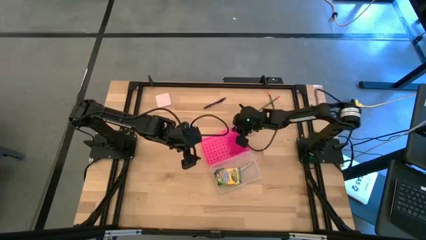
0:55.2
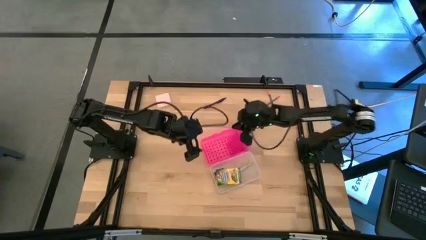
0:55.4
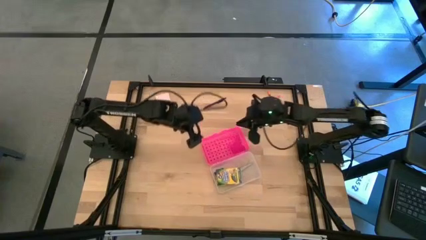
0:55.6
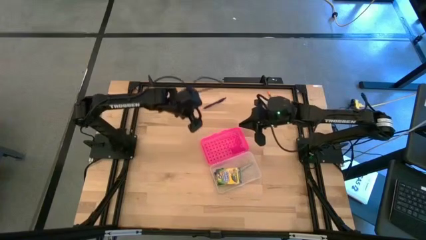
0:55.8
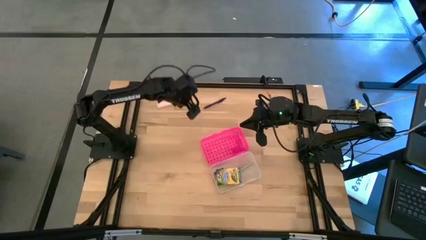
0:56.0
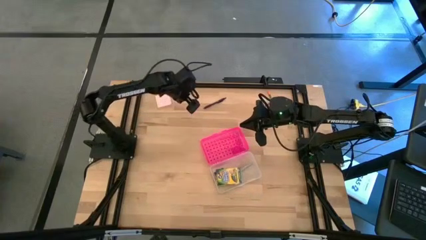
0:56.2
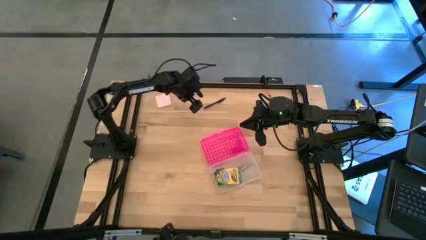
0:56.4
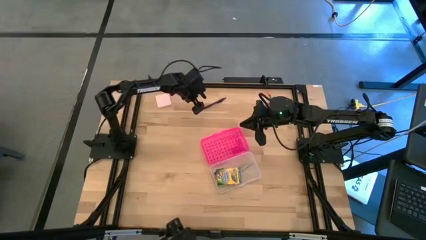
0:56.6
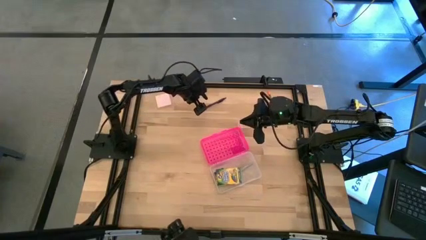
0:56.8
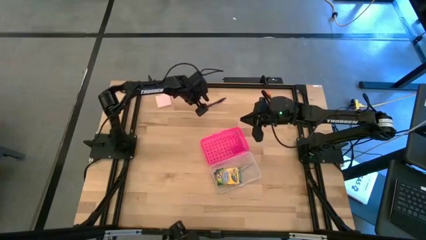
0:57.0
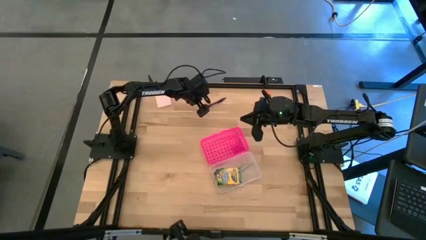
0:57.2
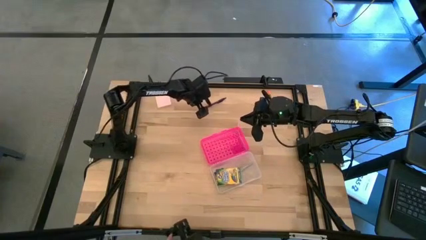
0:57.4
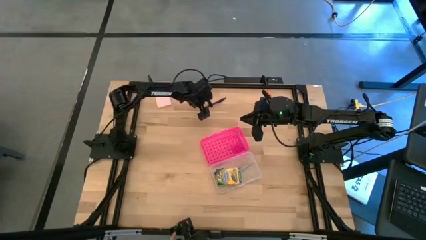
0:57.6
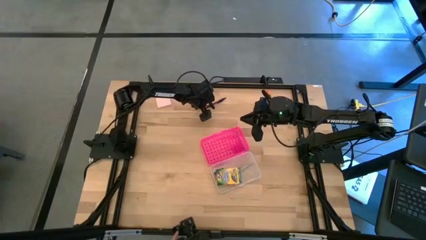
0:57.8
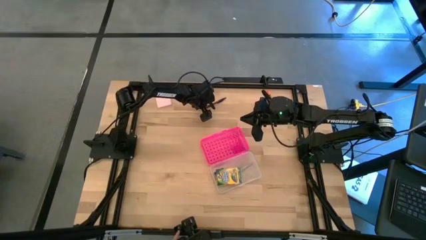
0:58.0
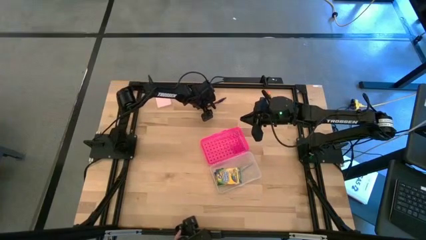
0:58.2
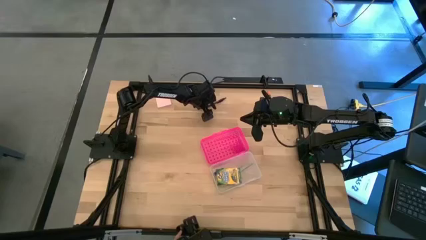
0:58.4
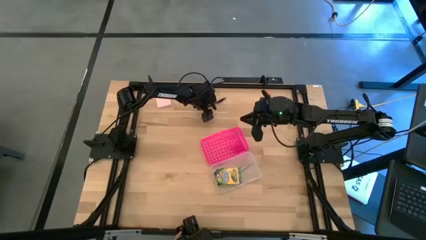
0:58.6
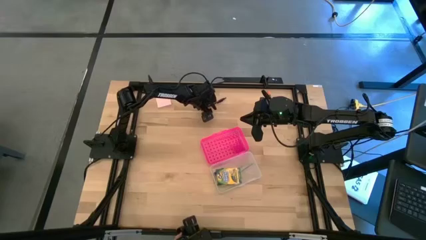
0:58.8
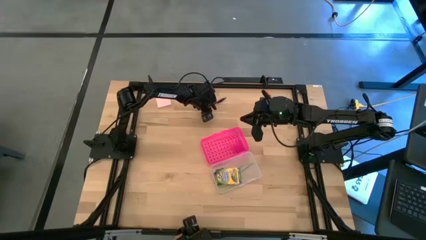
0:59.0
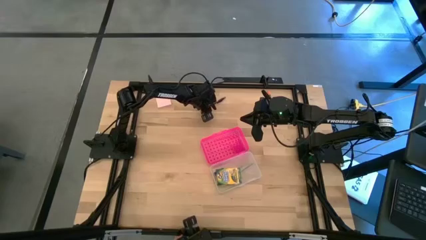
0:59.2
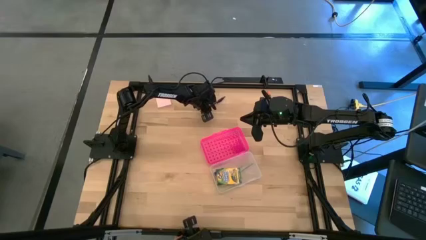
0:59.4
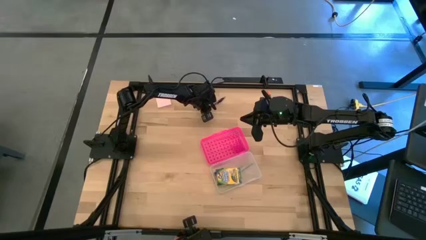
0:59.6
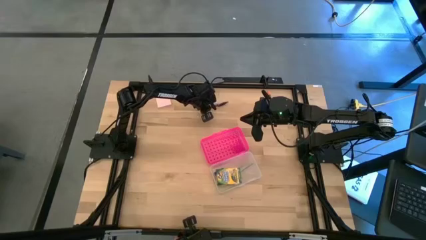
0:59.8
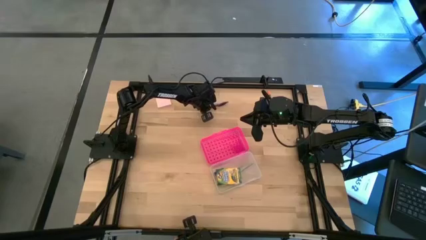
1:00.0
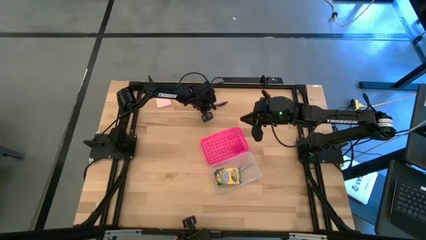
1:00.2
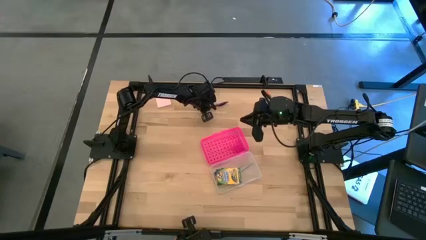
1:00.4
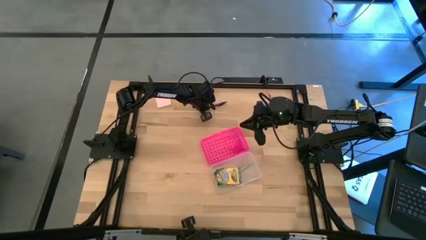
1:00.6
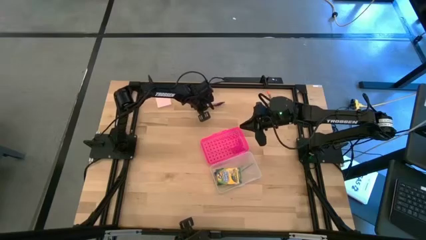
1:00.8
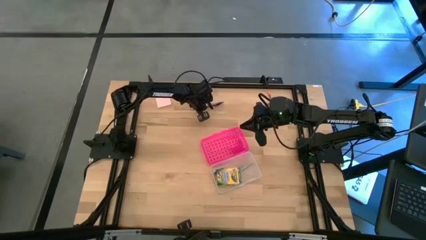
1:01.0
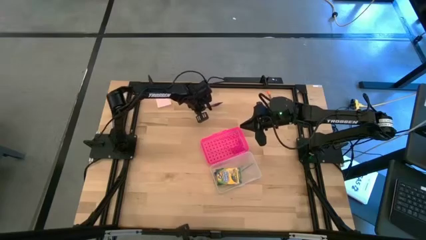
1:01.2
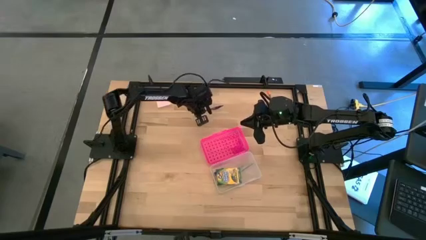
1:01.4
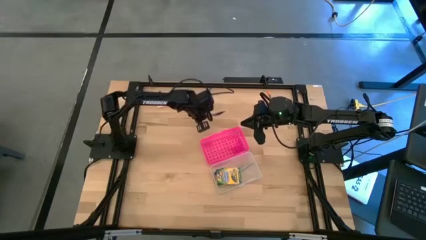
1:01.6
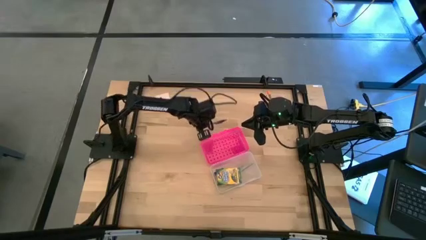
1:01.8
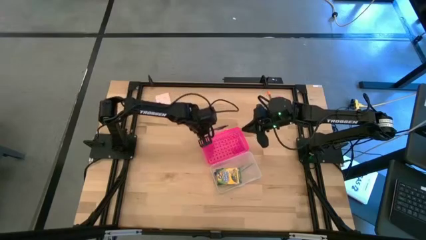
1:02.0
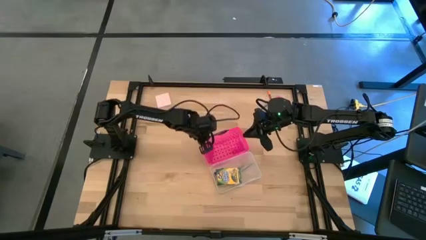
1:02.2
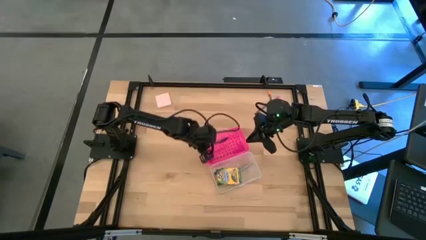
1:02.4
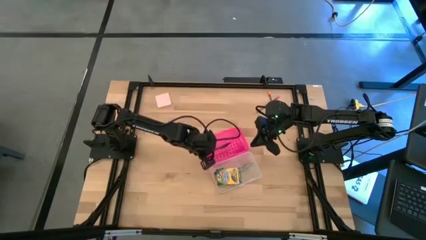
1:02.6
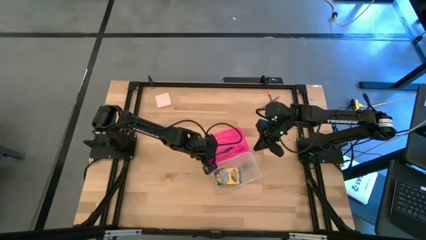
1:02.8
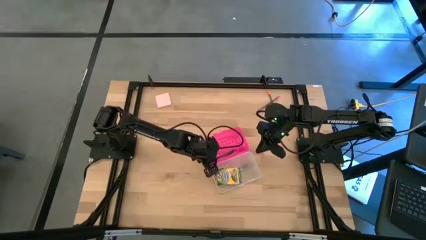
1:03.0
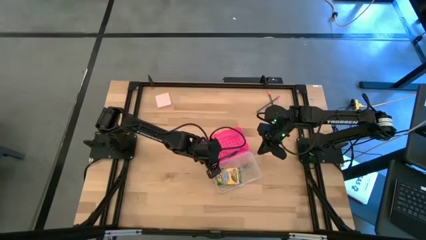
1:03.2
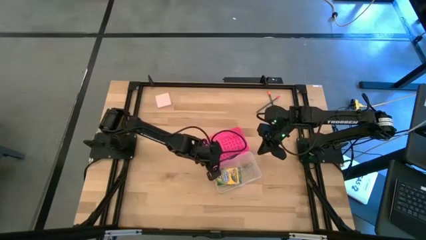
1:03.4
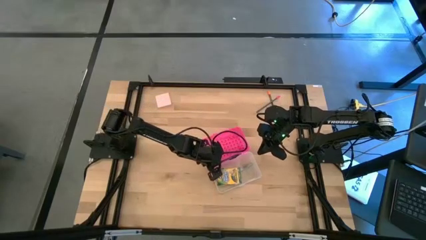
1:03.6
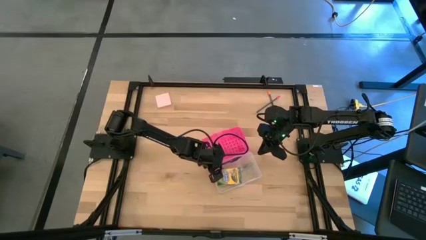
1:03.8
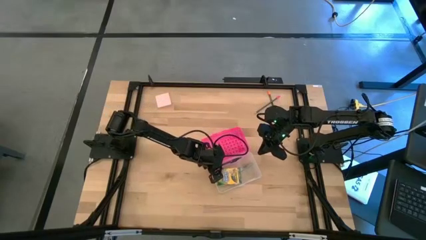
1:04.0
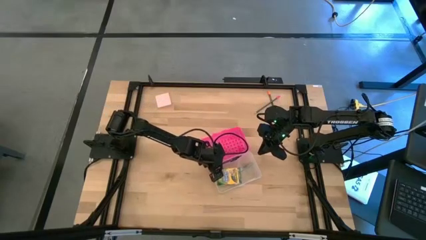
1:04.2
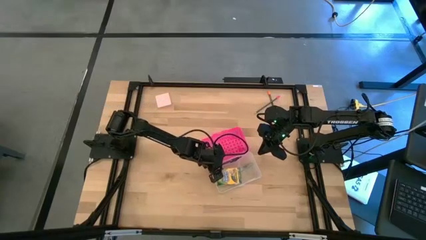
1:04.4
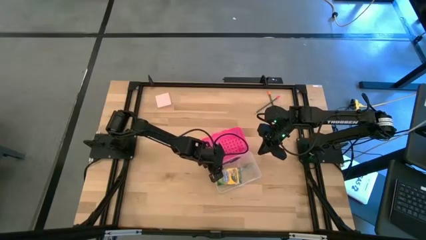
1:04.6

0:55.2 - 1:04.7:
Task: Pack school essentials
Put the purple pen into the pink box

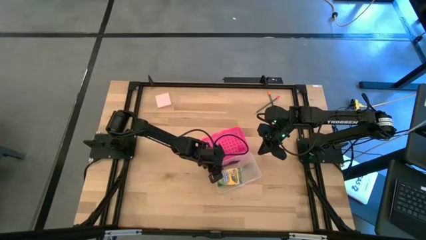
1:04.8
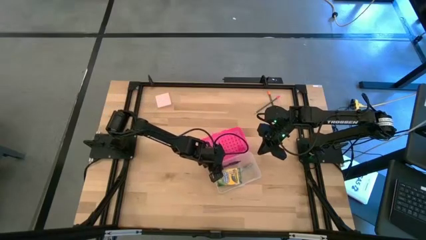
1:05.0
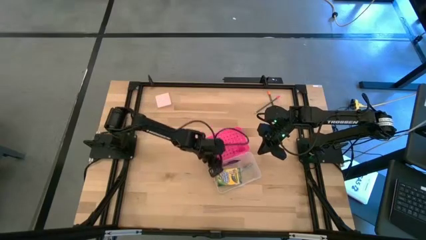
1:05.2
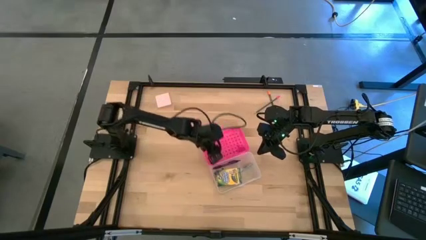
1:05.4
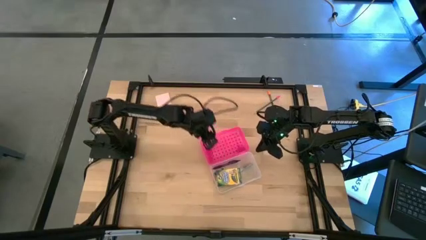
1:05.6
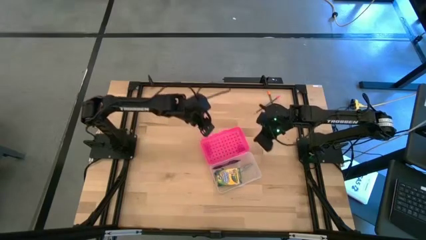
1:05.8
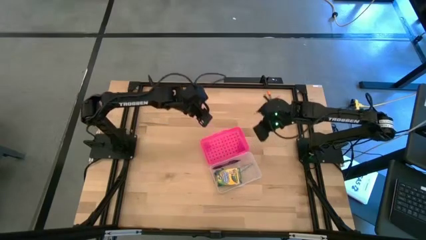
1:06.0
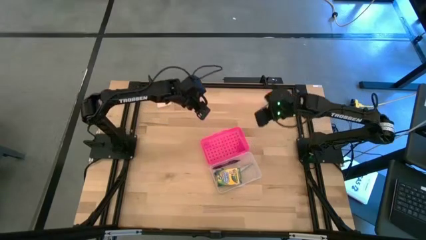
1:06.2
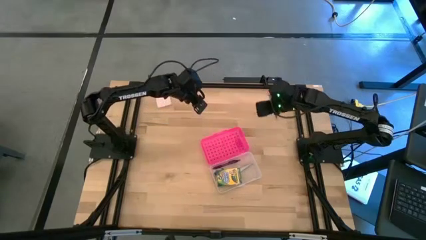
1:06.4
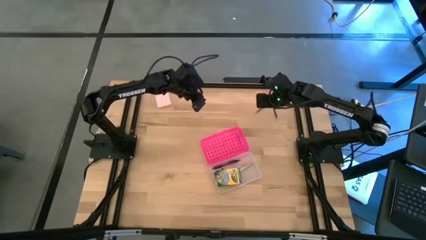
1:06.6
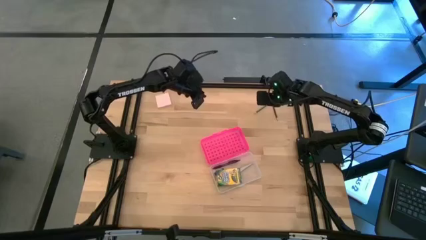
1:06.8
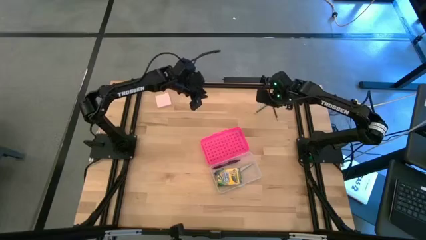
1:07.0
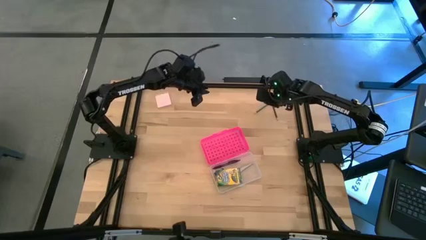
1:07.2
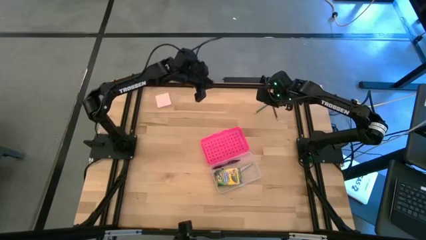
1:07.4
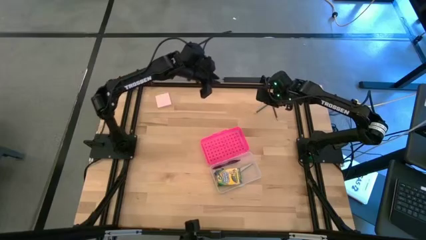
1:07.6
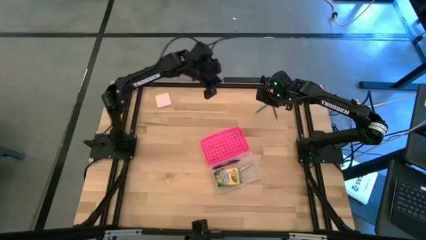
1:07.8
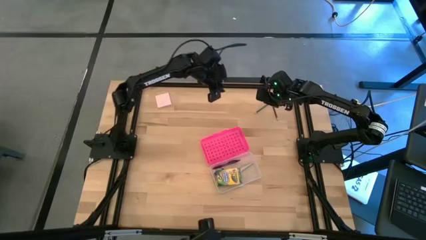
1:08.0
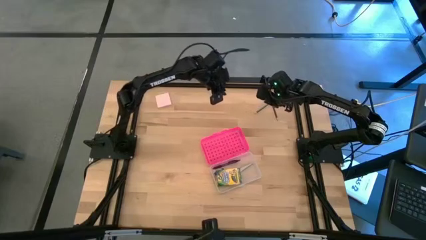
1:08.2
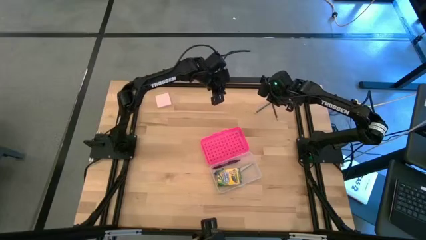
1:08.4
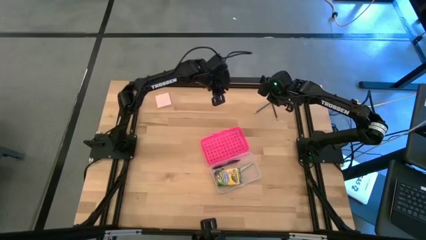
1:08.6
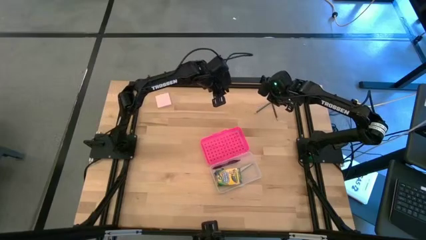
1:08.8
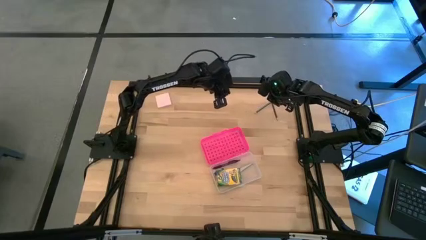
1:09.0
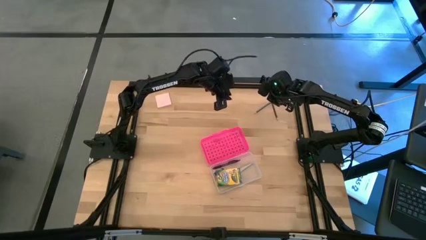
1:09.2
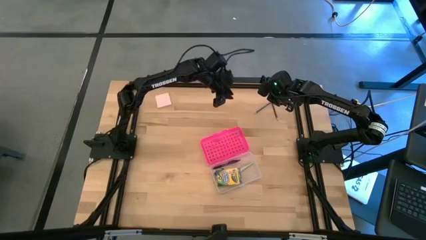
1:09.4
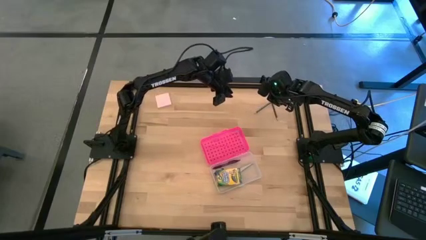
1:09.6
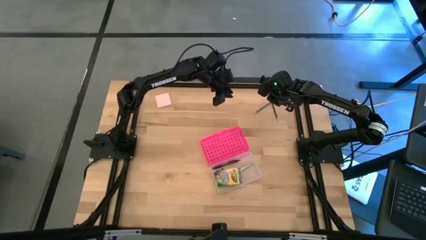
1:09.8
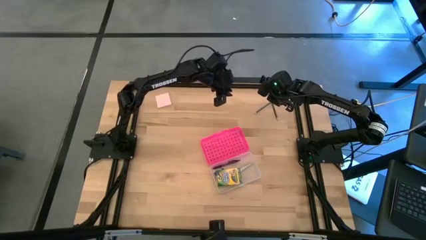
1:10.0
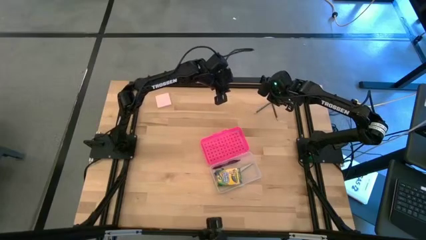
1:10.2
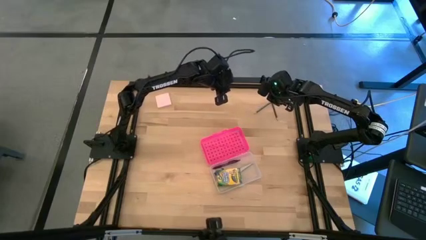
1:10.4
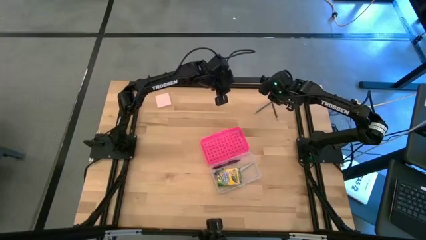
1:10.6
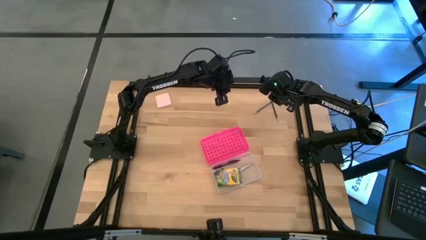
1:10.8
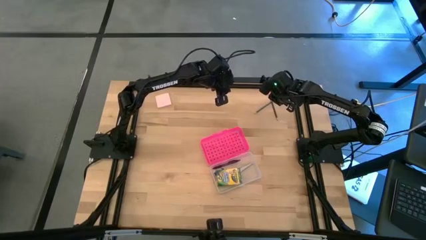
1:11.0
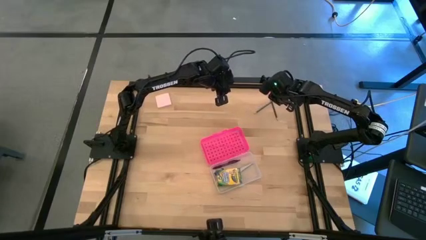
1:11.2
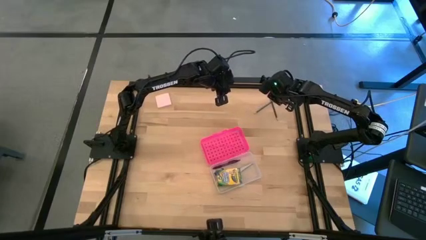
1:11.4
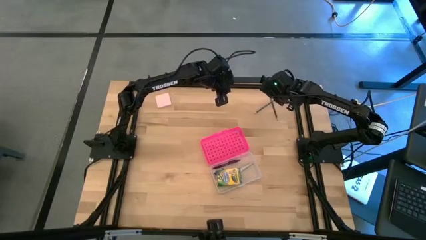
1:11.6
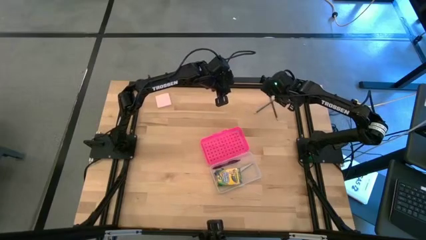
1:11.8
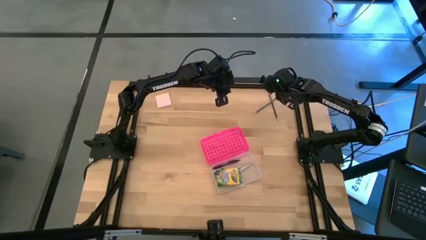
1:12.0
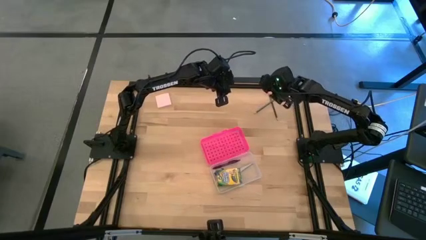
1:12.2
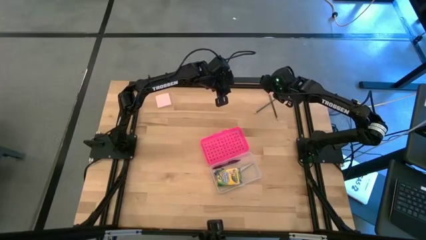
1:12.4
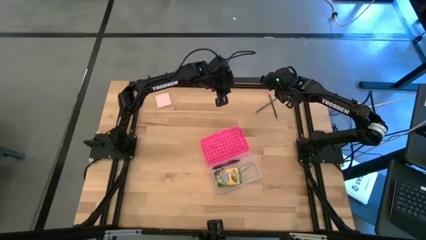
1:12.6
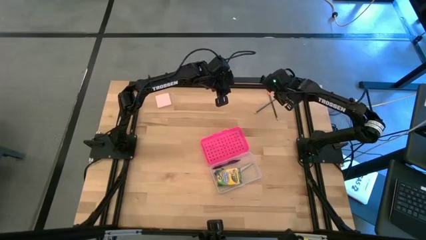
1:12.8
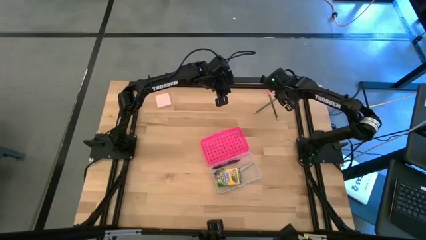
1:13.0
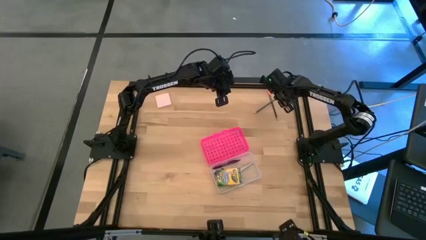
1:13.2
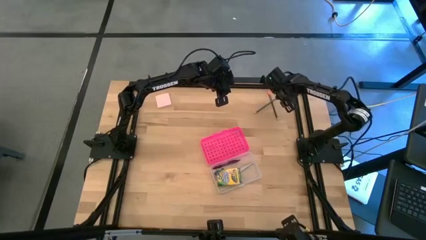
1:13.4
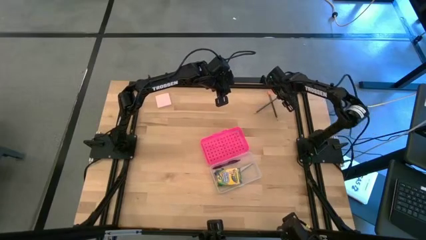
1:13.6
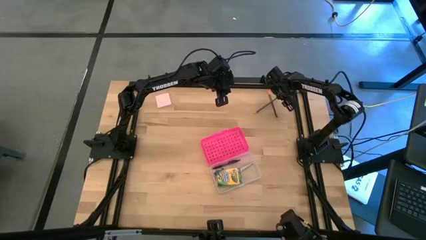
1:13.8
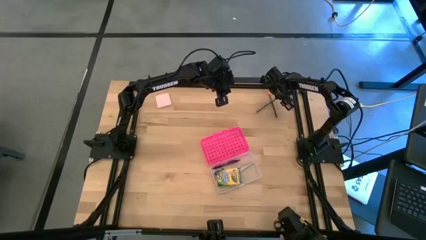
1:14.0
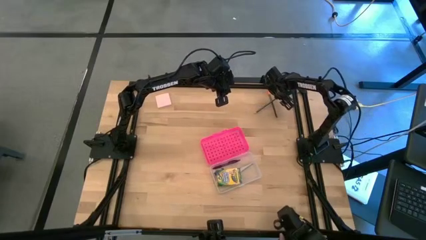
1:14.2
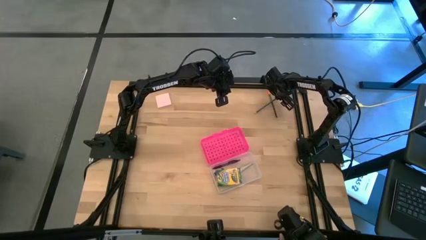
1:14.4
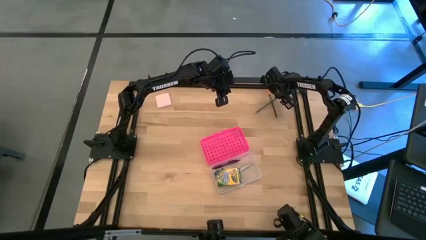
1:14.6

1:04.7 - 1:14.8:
Put the pencil with the pink top eraser into the pink box
